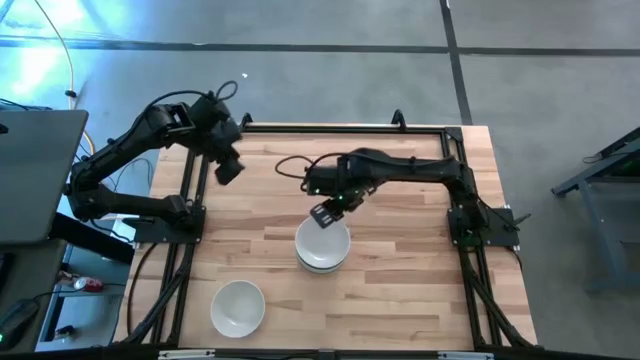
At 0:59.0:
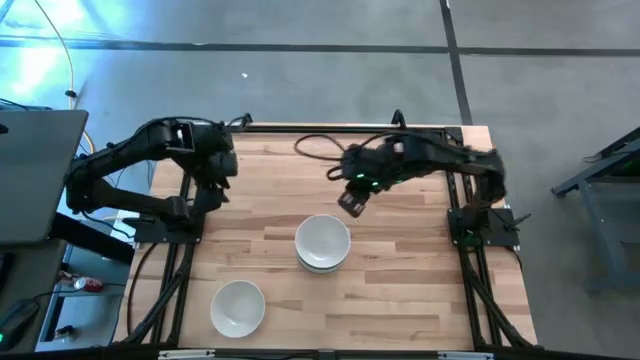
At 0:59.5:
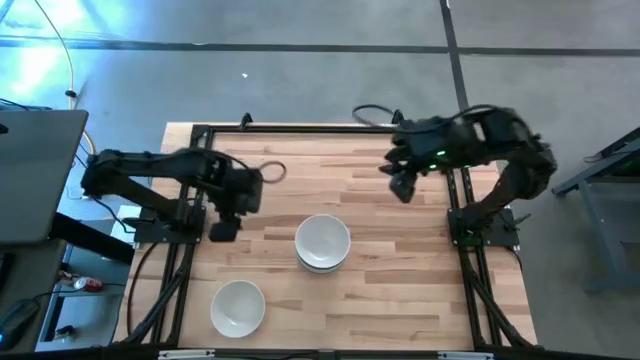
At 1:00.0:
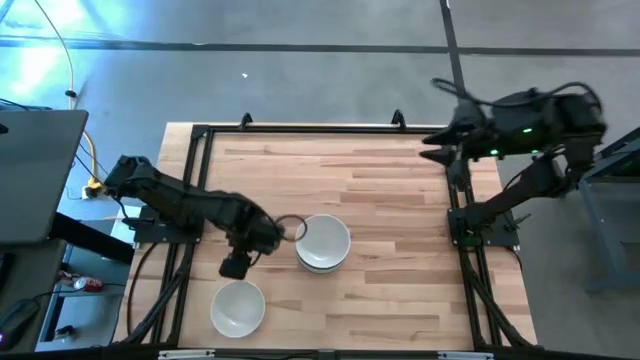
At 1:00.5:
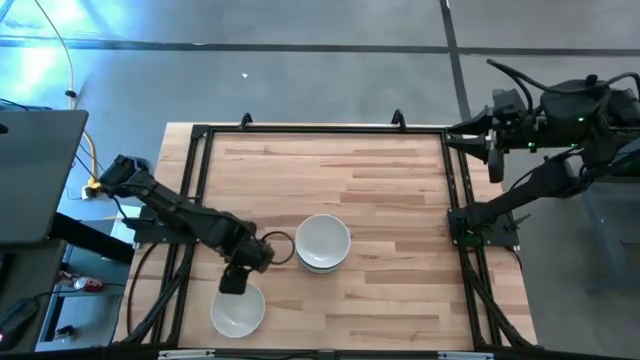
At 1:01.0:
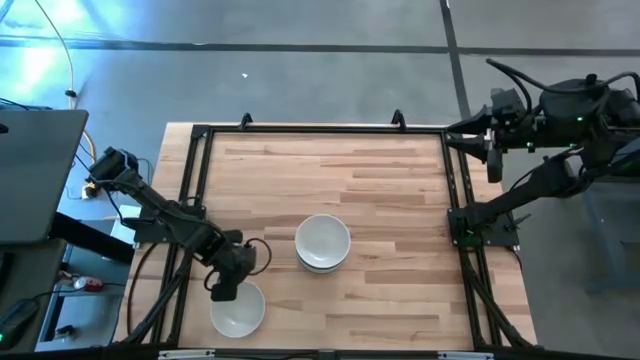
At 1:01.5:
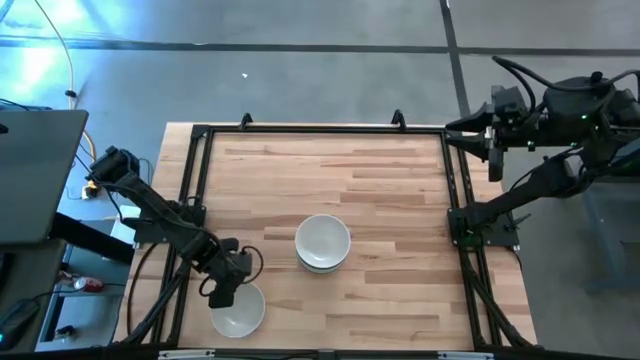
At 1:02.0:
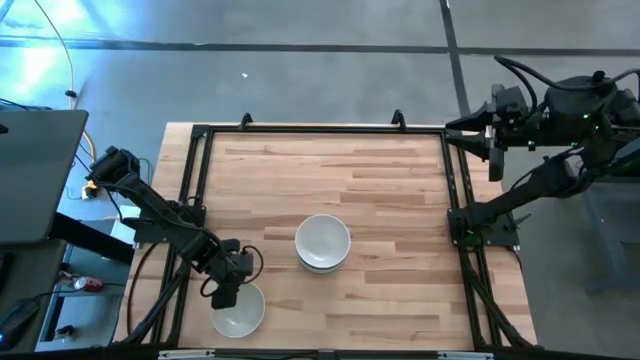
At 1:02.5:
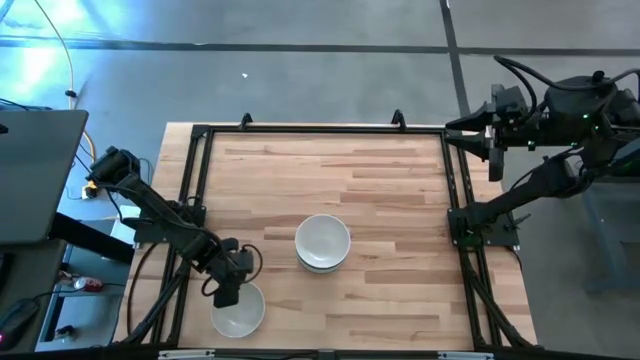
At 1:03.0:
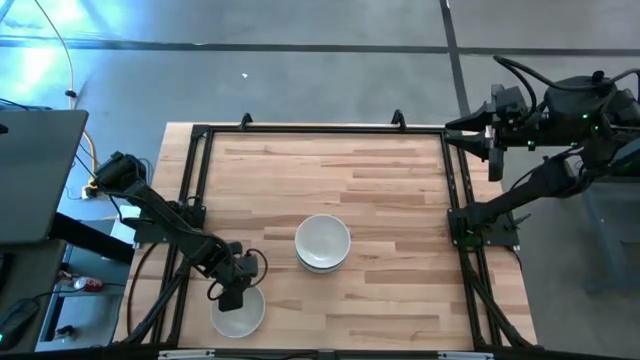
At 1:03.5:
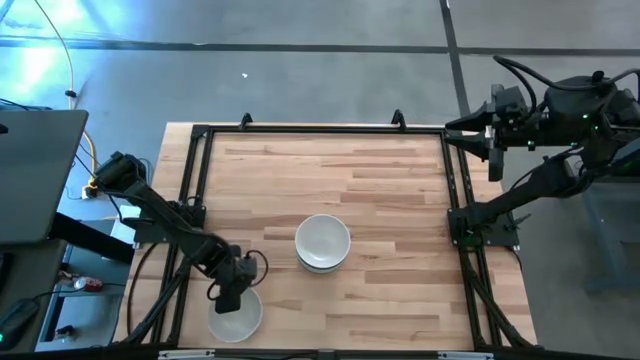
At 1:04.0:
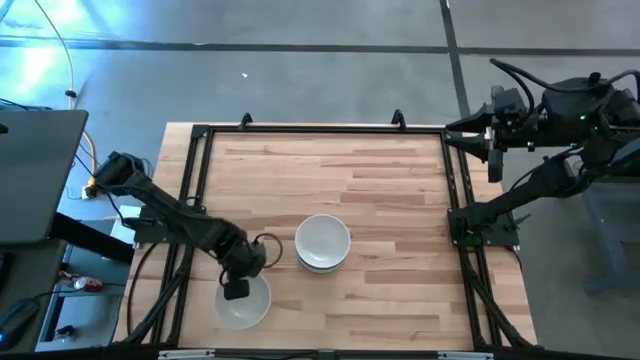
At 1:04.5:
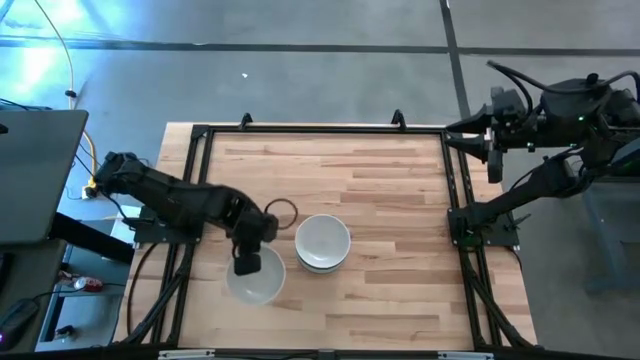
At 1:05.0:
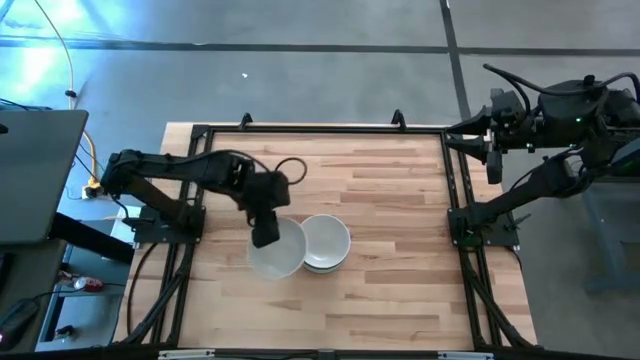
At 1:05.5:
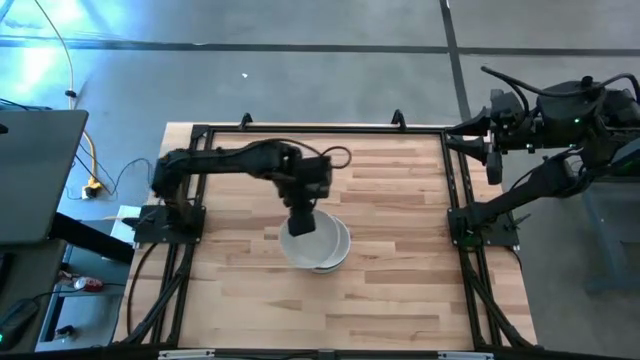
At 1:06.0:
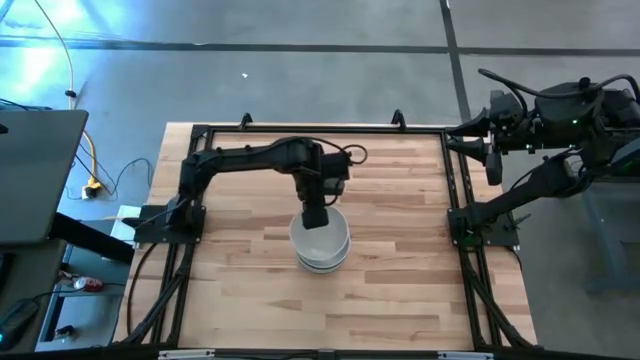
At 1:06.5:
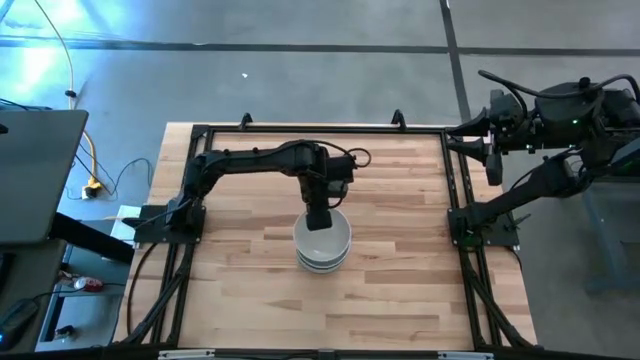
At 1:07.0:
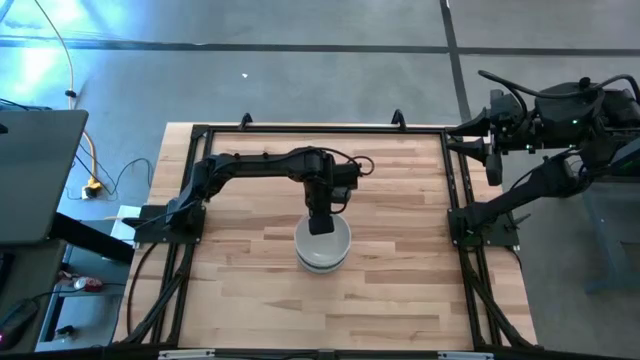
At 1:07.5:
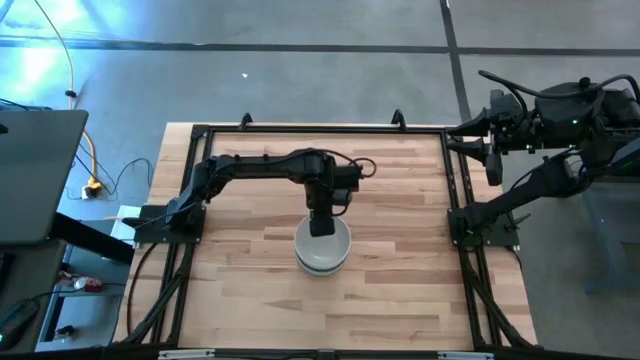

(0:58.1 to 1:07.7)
Task: Nest bowls inside each other
Stack the white bowl on top of the white bowl

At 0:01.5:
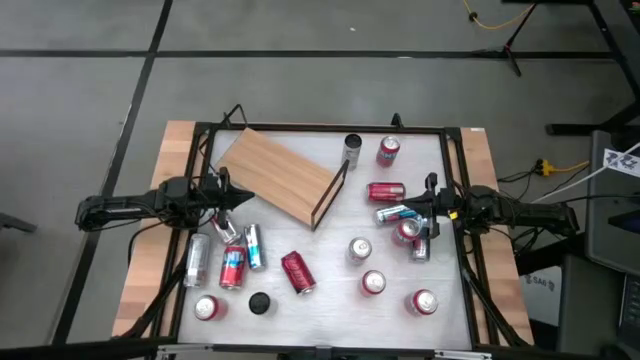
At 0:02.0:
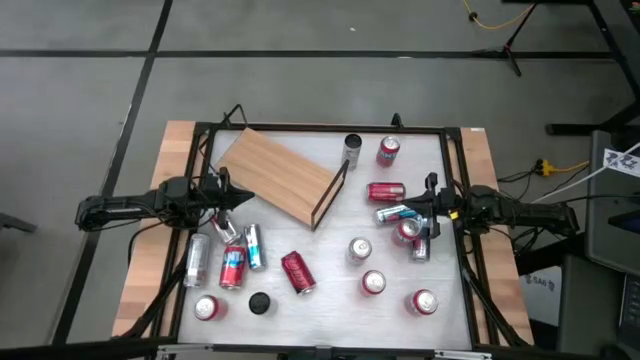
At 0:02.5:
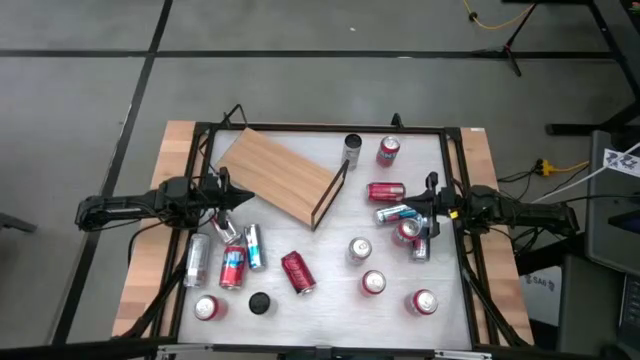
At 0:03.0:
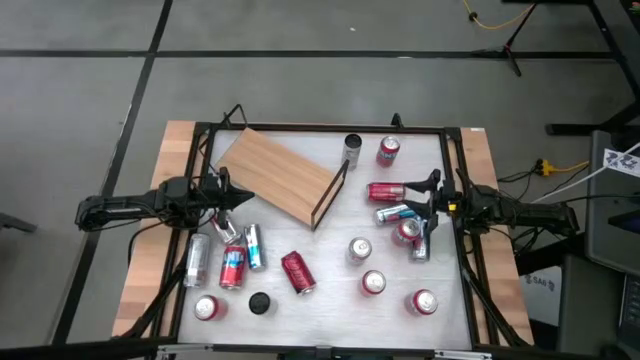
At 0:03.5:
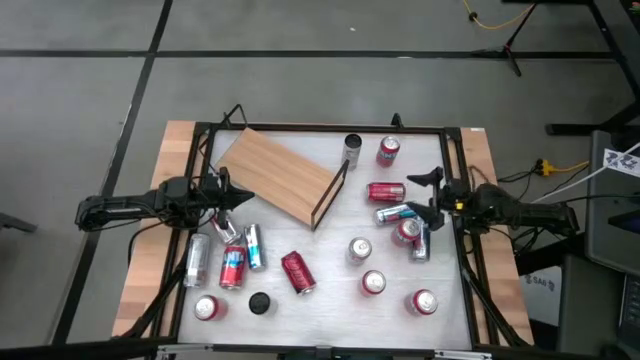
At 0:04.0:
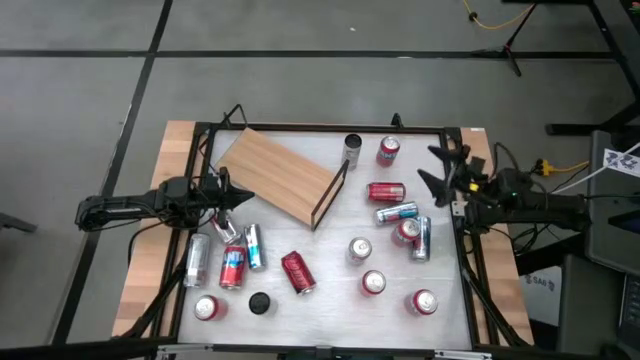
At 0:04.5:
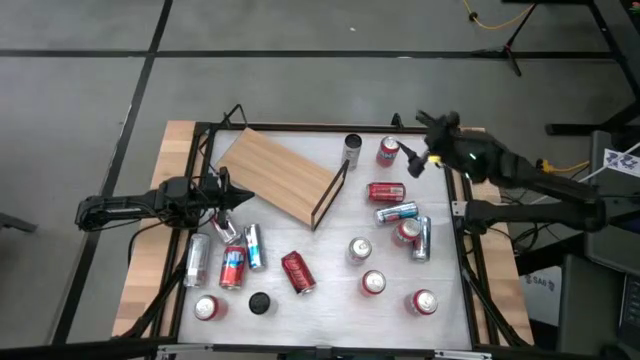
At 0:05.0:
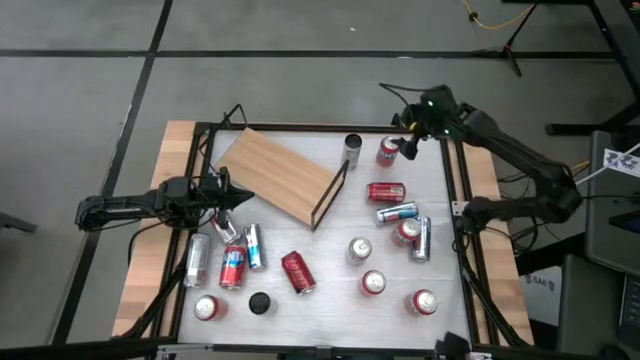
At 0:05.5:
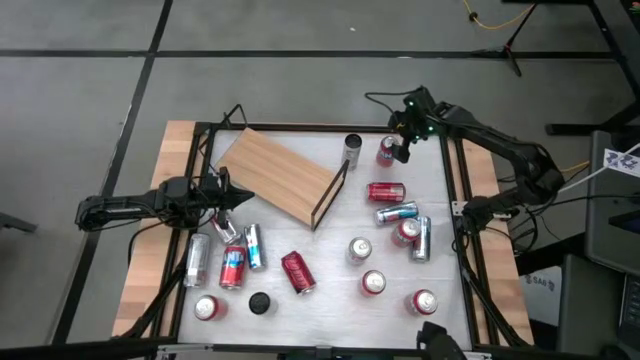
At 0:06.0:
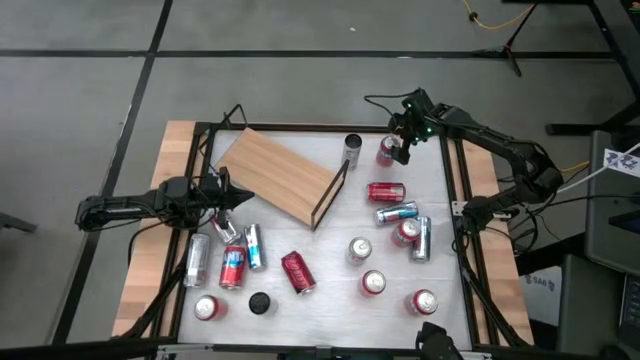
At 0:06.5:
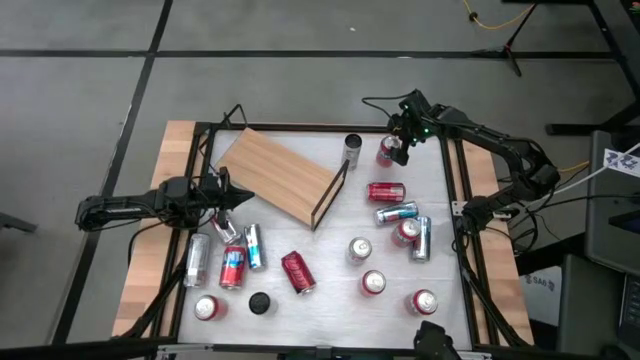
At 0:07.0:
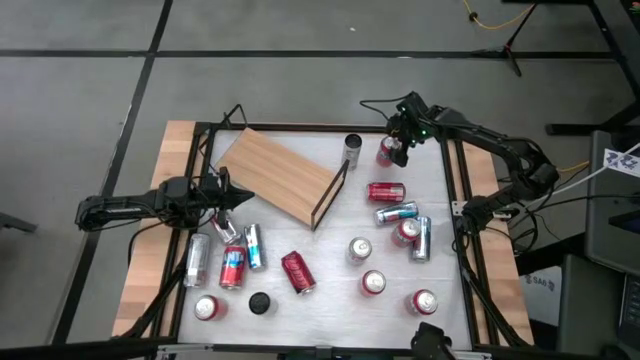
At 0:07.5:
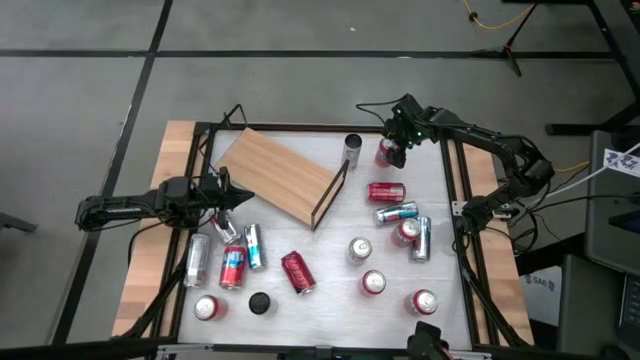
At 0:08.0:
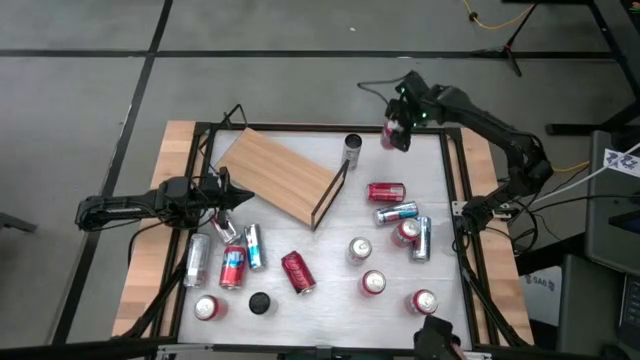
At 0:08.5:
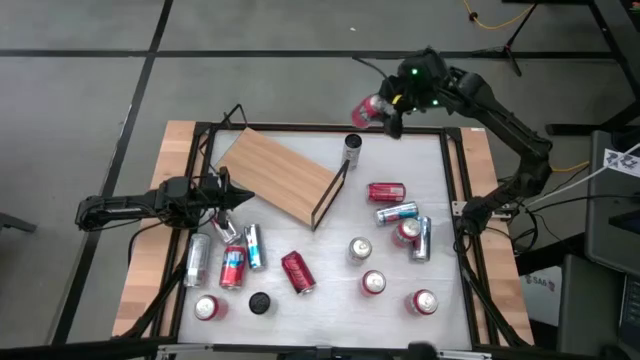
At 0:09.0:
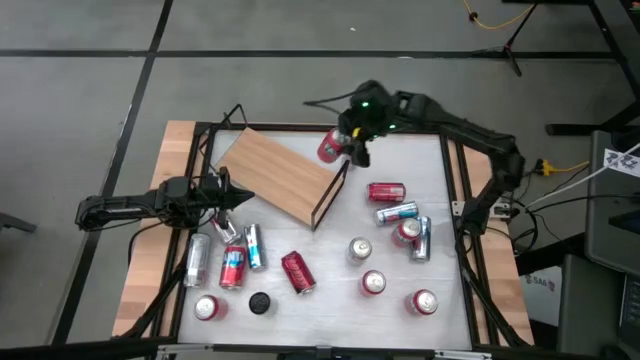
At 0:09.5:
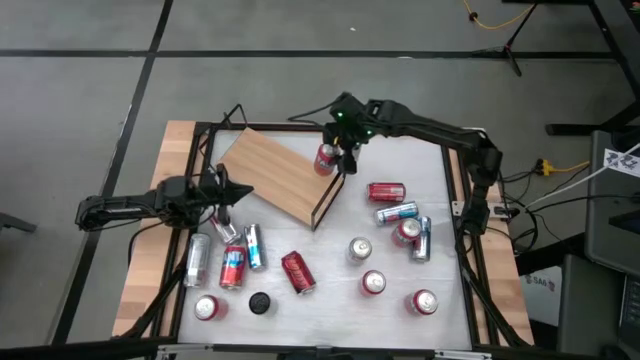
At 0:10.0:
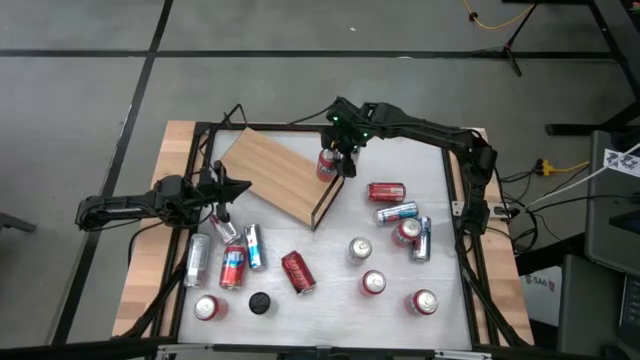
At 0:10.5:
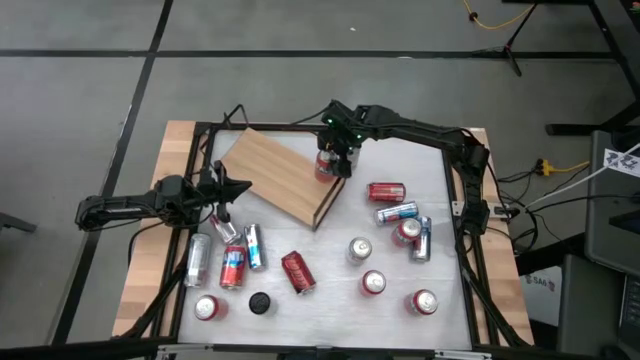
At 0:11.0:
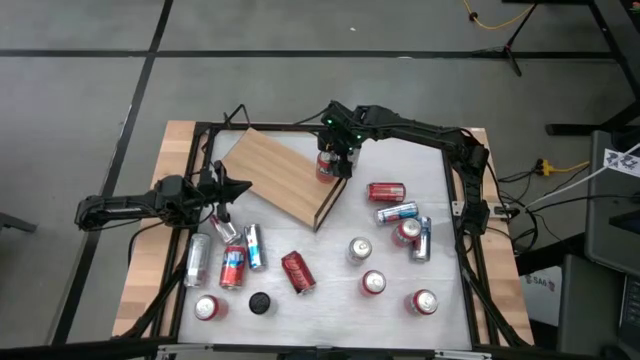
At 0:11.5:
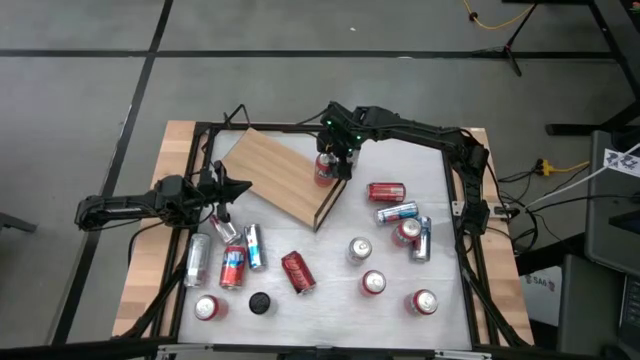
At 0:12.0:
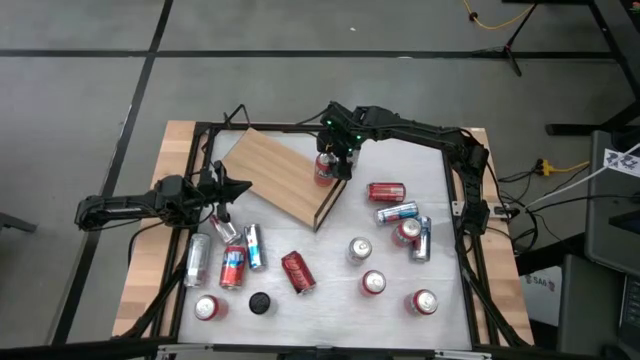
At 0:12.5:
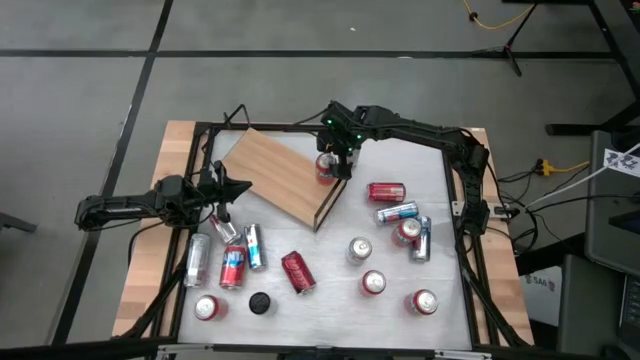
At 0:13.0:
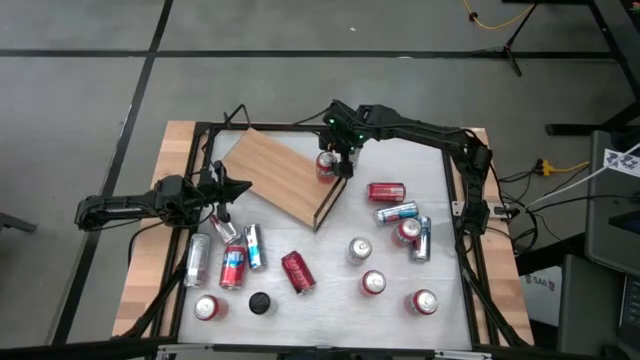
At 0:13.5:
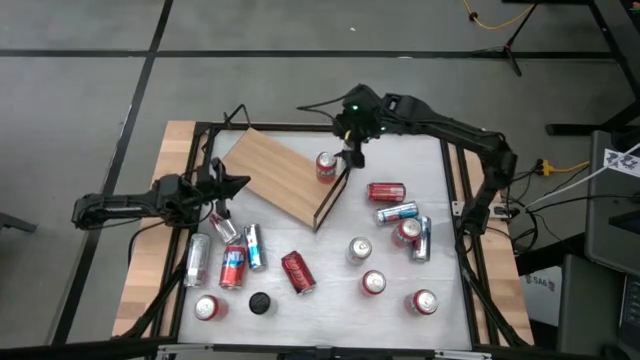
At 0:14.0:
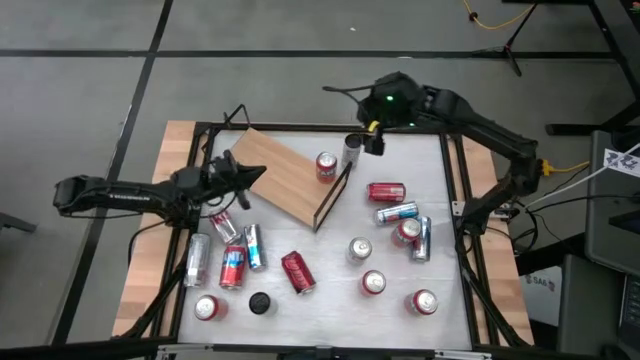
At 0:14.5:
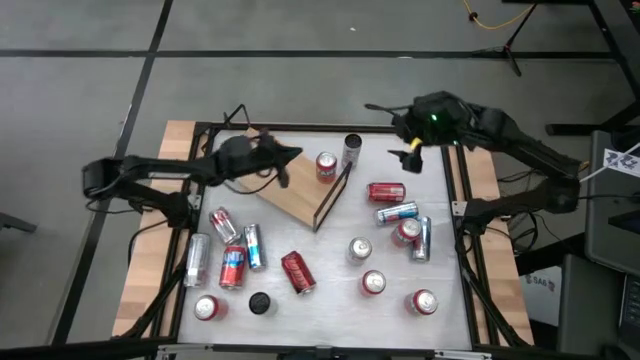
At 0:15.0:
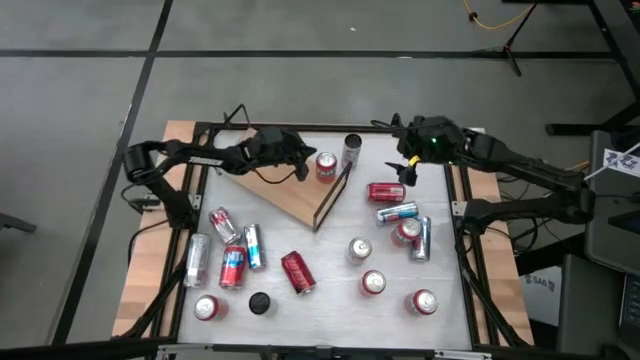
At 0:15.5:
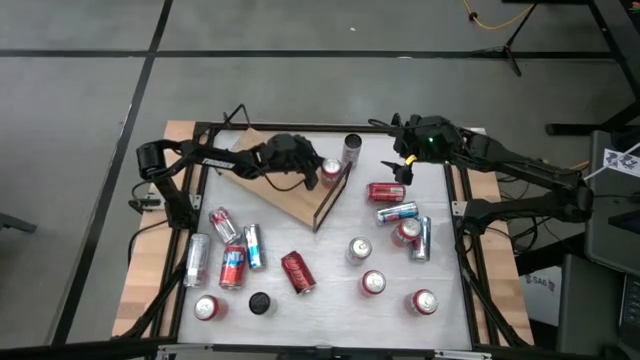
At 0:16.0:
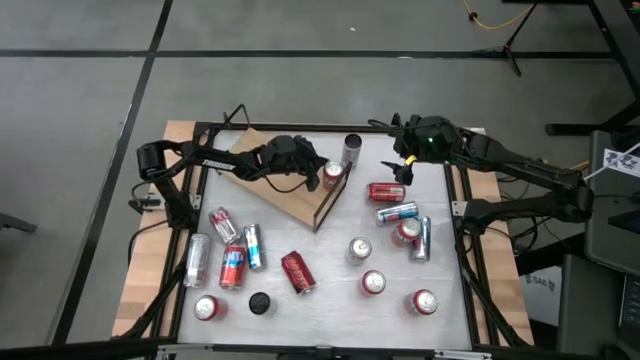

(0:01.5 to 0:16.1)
Task: Pick and place cans onto a shelf
Put the top right red soda can on the shelf
